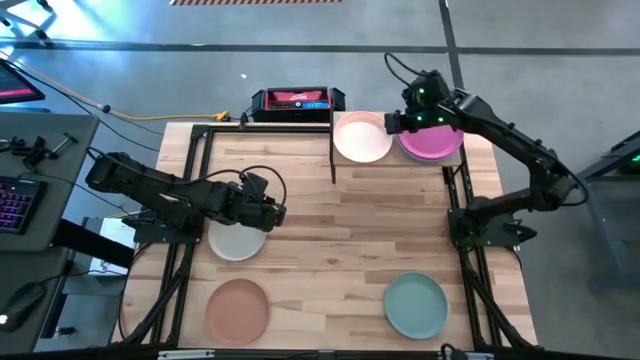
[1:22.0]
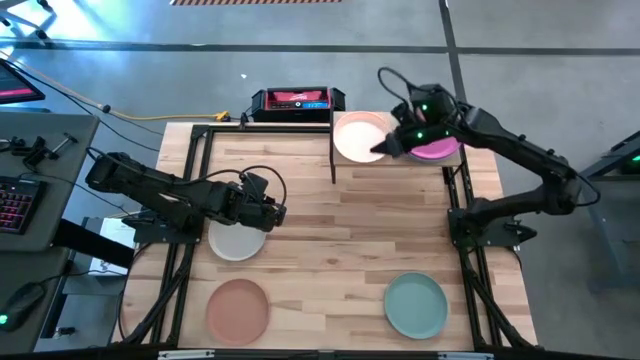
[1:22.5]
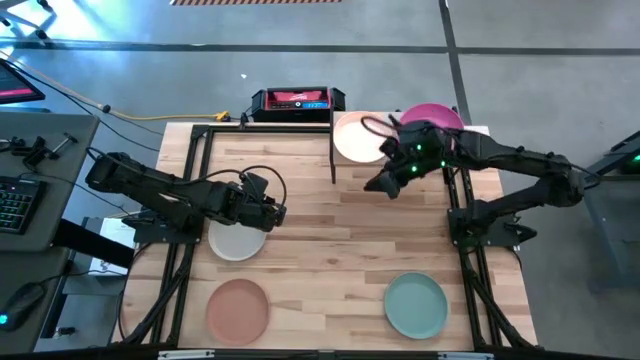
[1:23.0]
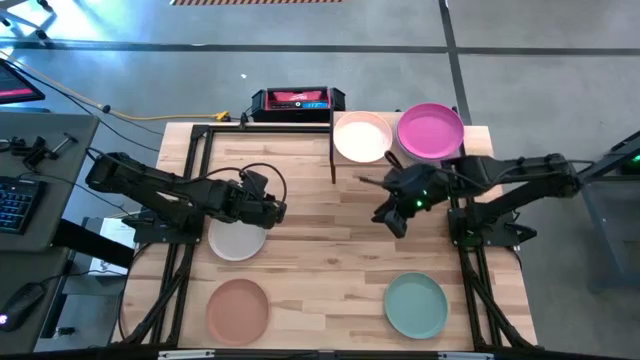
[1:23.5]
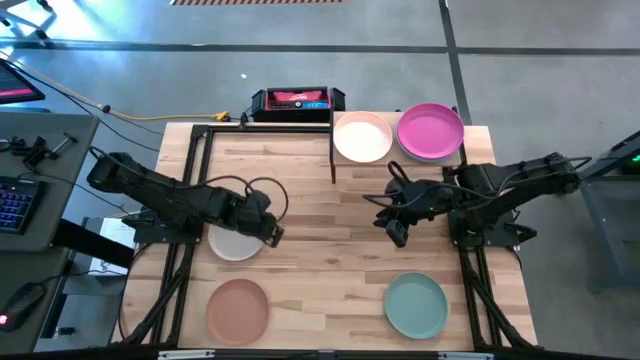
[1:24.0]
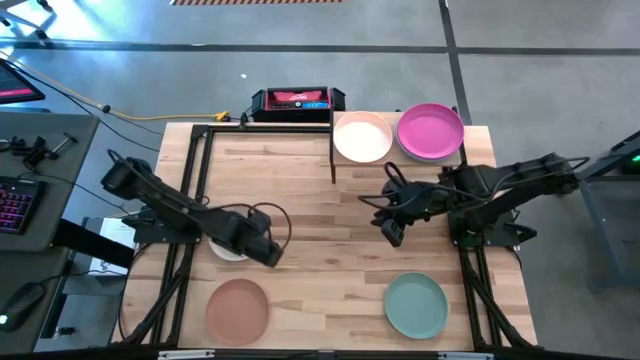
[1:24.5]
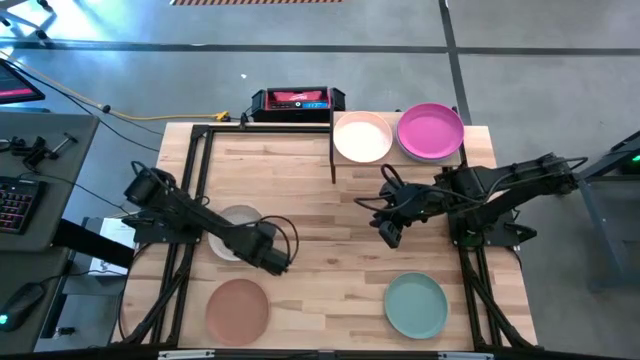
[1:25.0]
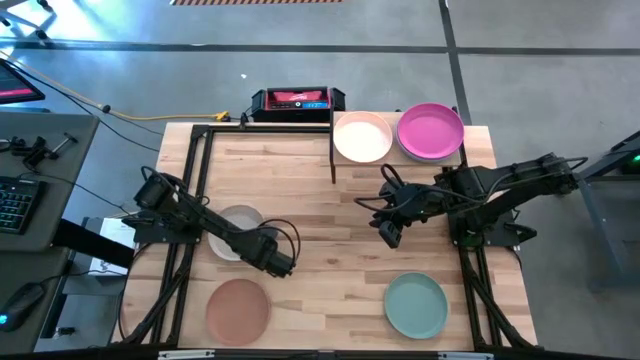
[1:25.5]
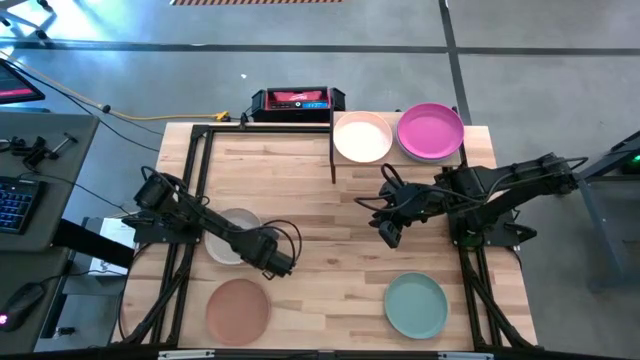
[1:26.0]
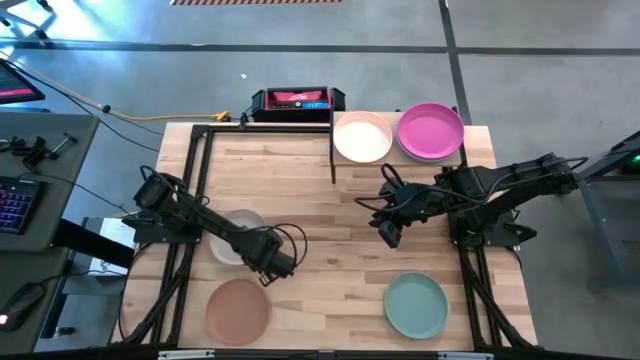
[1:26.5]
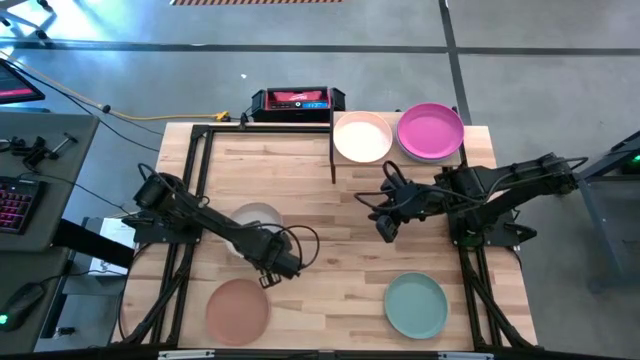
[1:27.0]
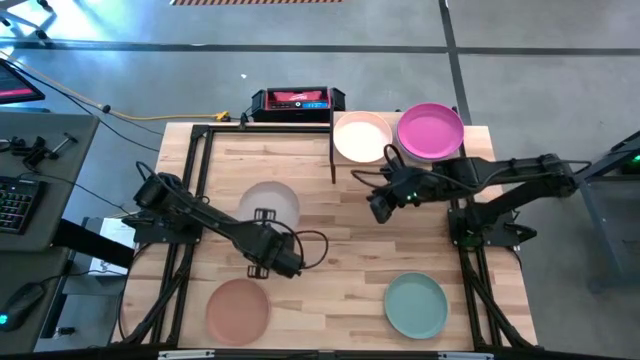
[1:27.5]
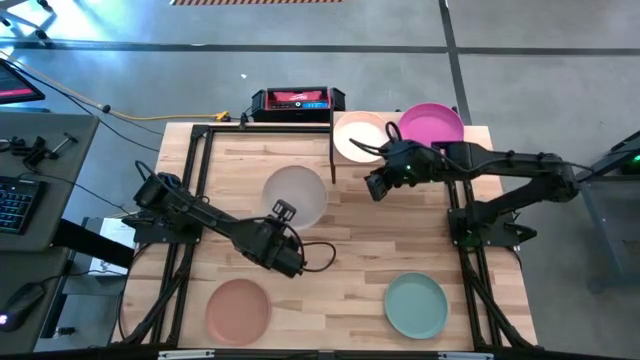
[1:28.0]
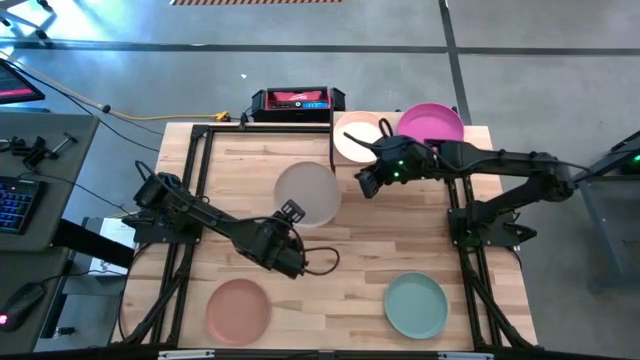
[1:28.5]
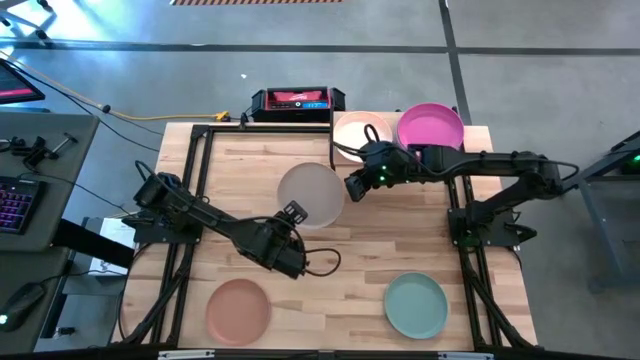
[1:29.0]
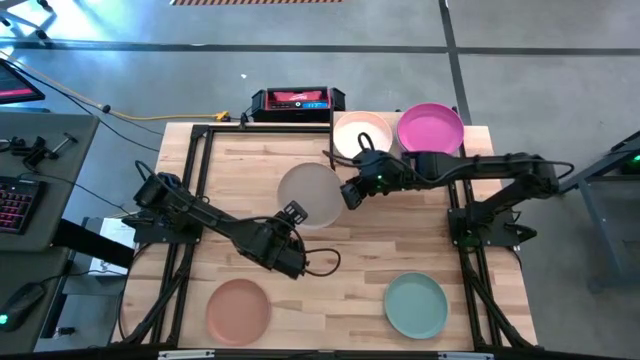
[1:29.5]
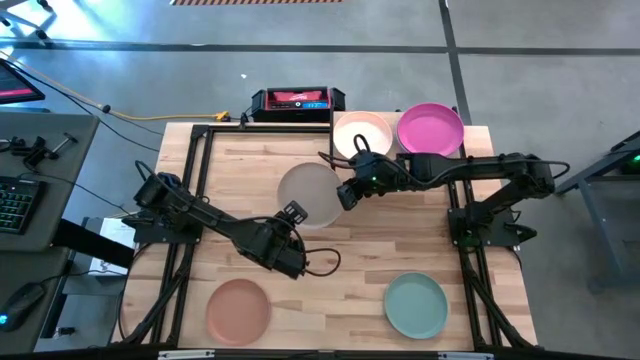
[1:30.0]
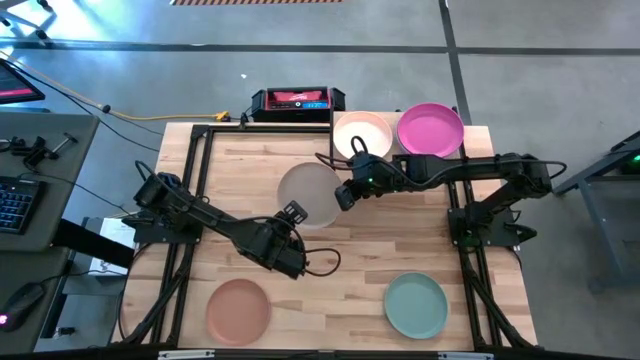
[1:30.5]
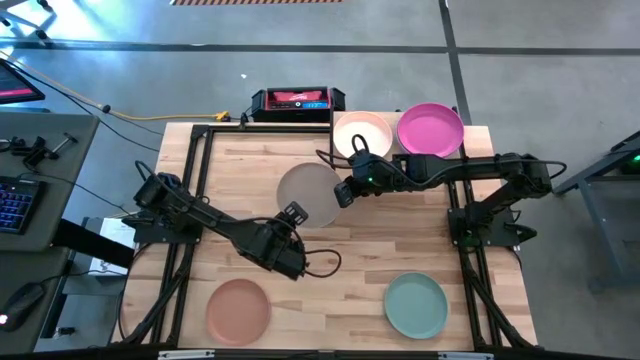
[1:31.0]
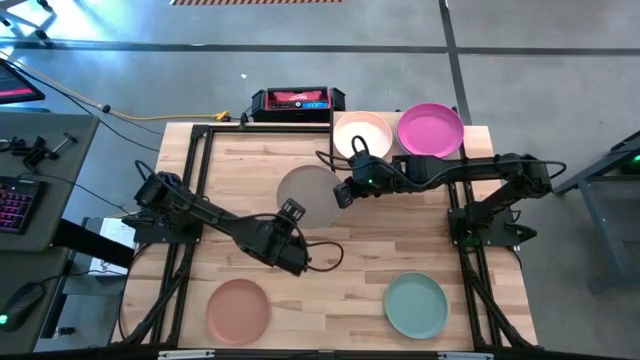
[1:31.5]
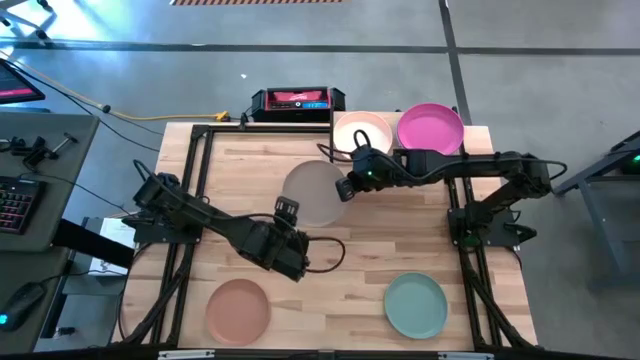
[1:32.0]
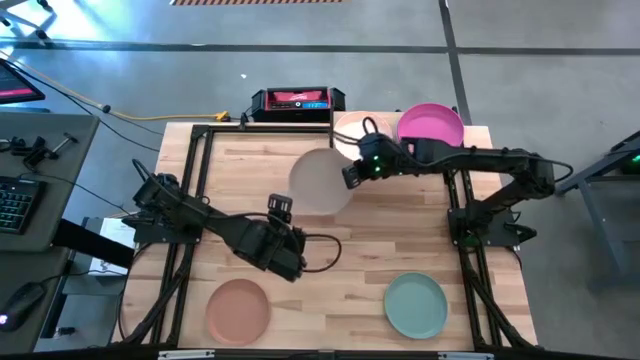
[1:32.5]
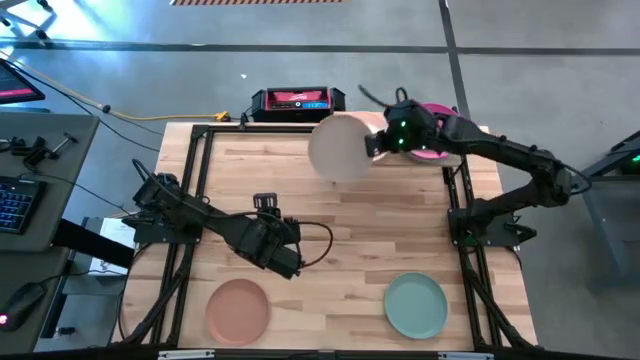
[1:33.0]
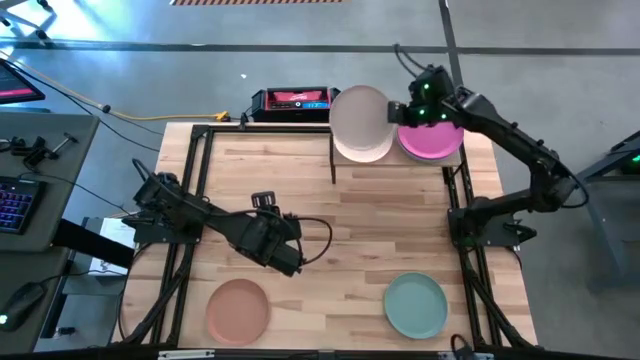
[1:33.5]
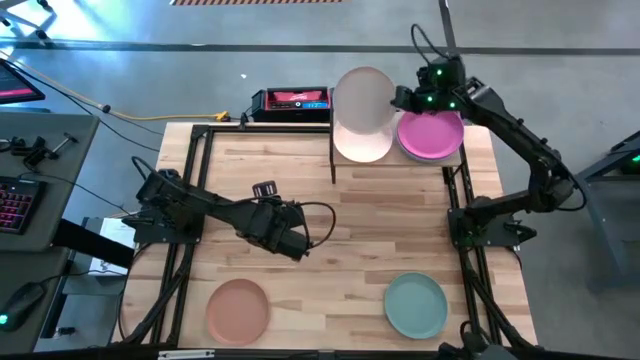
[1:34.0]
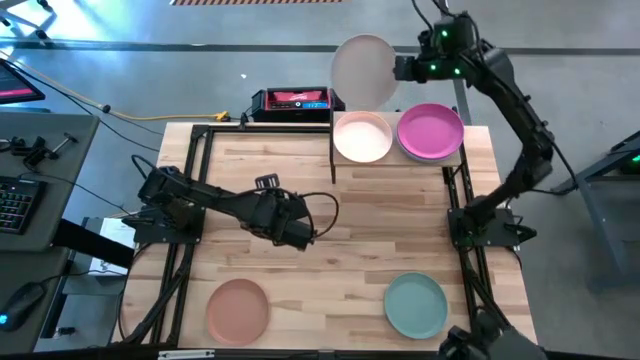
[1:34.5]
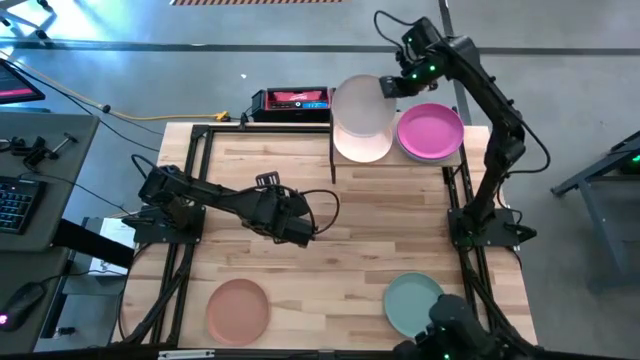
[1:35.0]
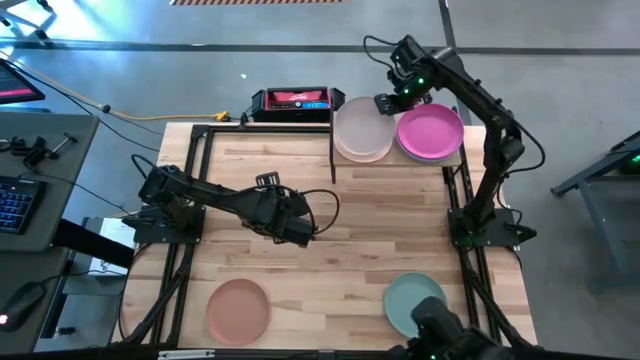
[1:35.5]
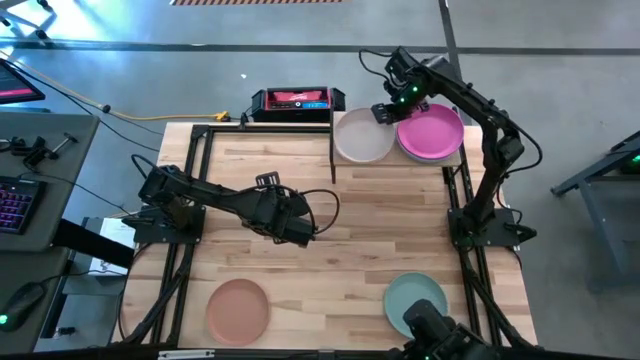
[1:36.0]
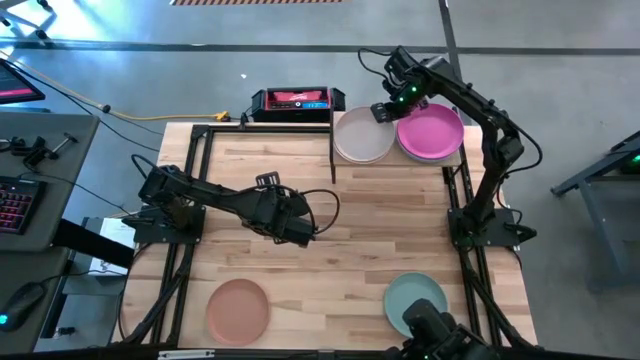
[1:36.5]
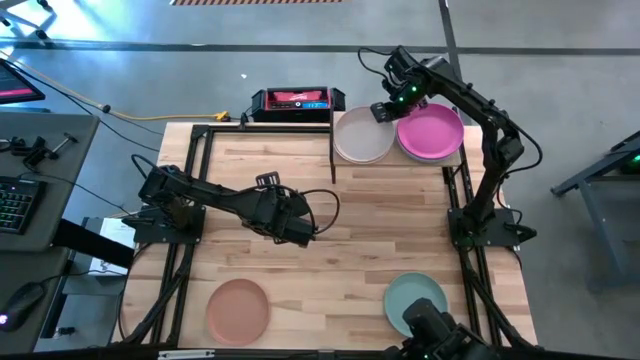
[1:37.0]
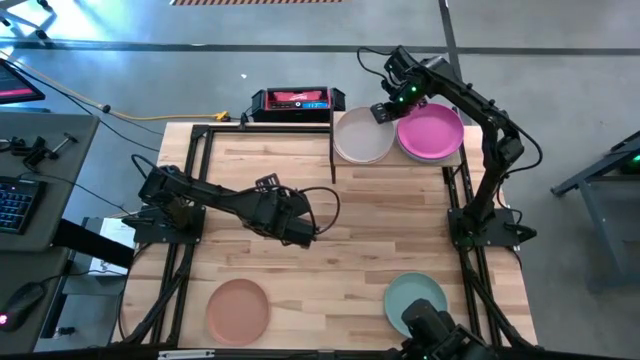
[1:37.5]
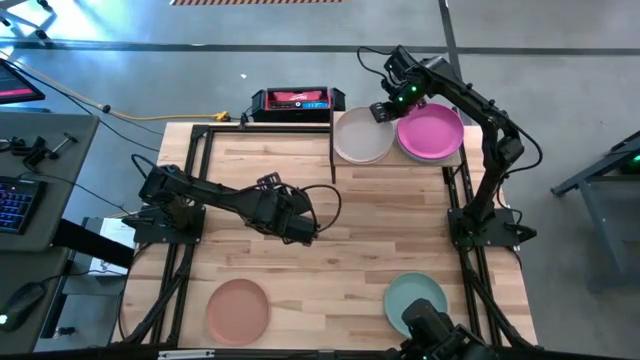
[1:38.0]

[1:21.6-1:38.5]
Task: Place and stack plates onto a shelf
Stack the gray plate on top of the light orange plate on the shelf

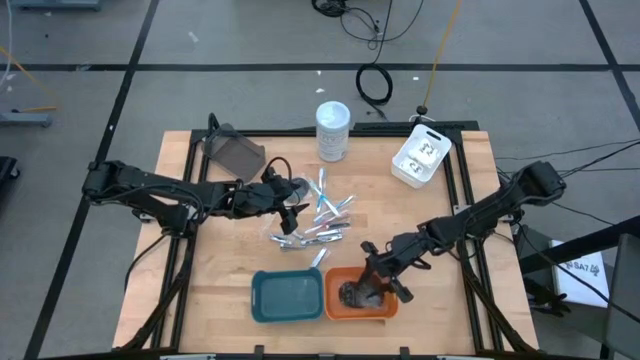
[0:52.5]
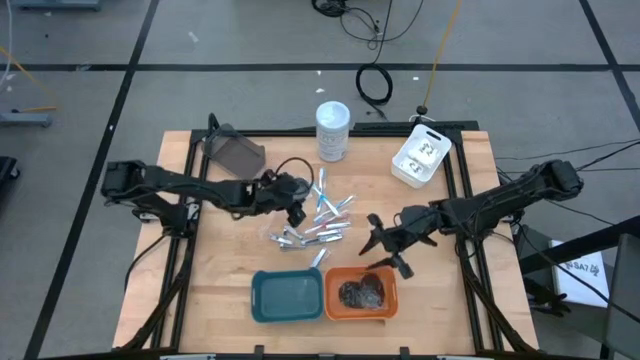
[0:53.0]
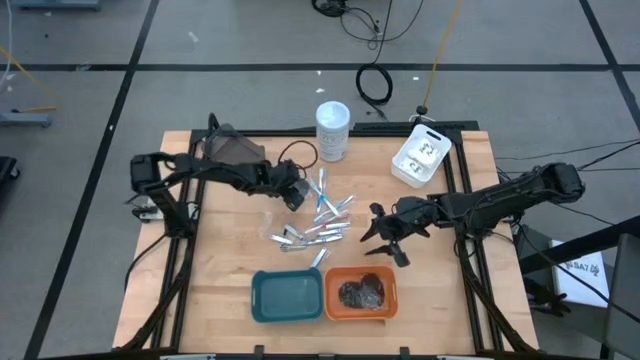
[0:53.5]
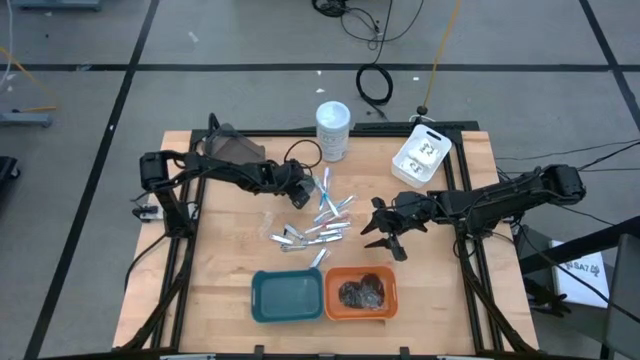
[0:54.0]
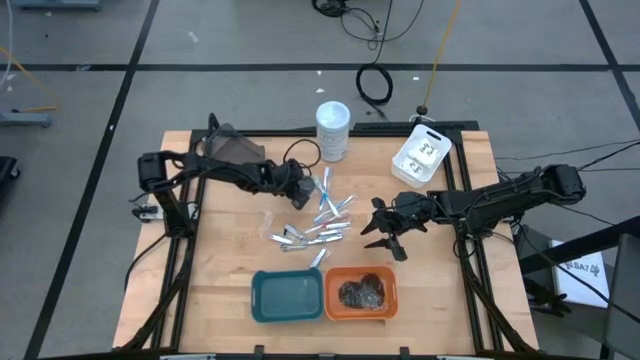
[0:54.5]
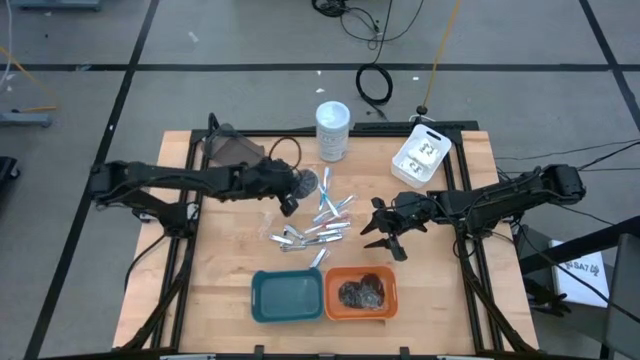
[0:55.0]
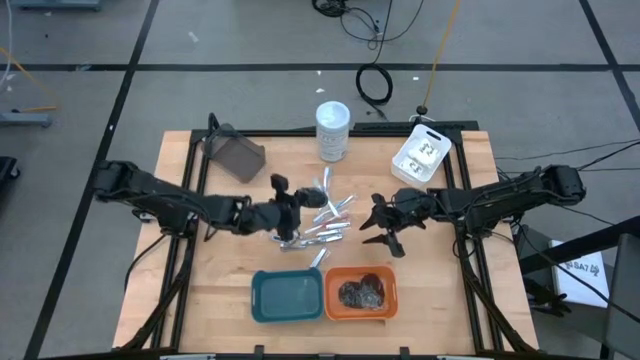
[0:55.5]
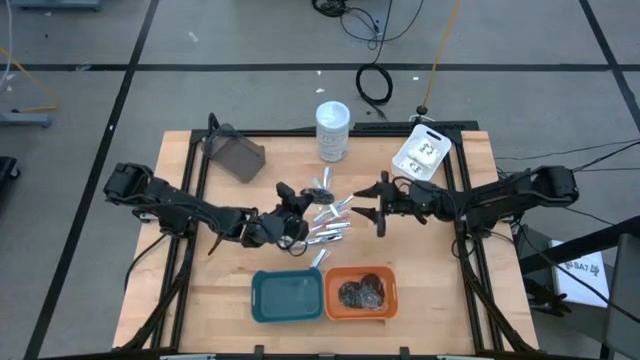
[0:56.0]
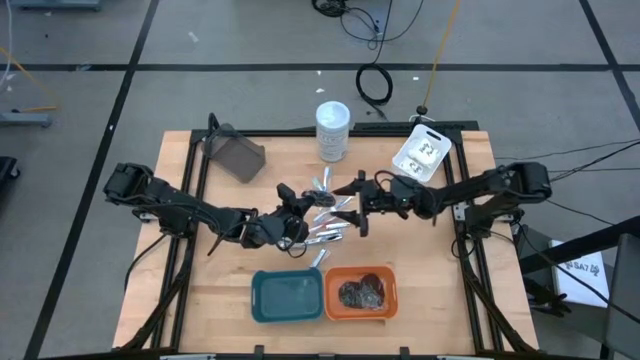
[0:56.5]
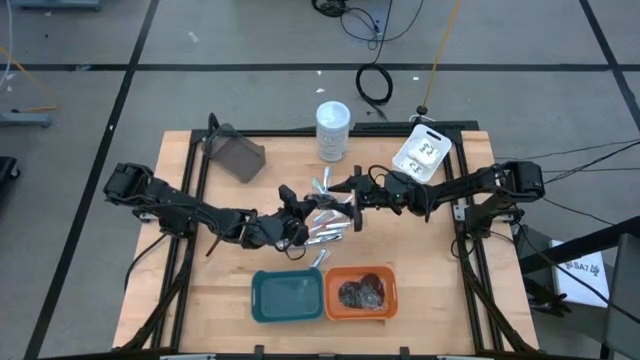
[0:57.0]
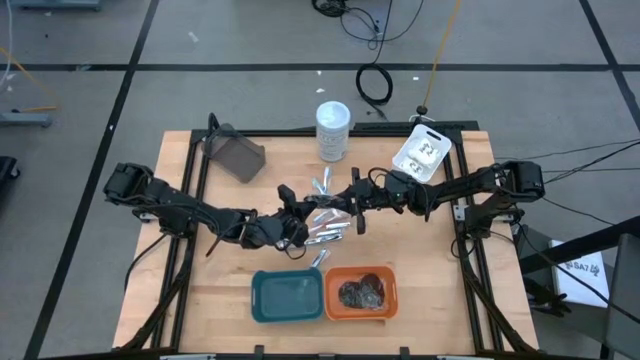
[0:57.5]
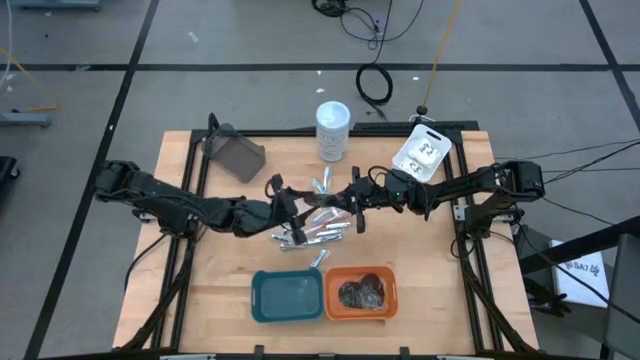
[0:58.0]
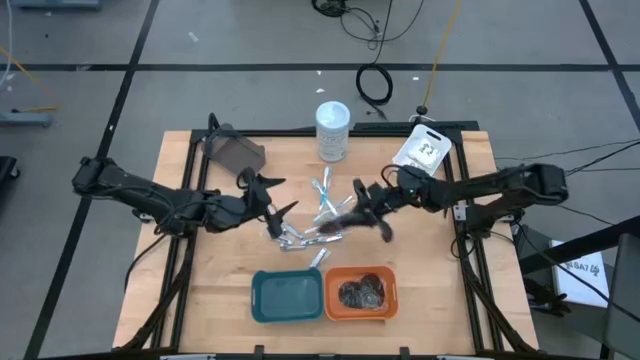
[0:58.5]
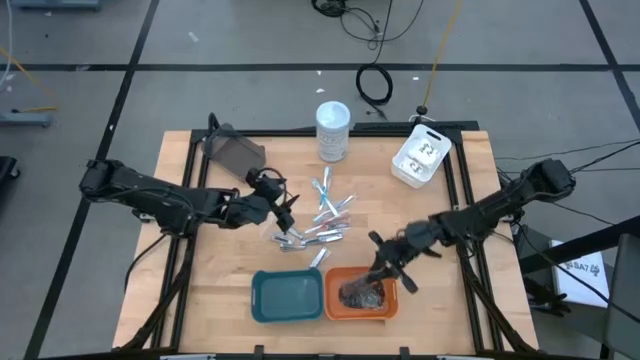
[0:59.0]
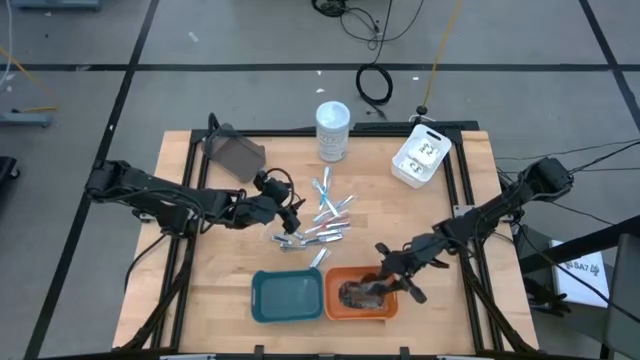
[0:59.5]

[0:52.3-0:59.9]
Task: Pick & Place Travel size toiletries
Put the black hairbrush into the orange bin
